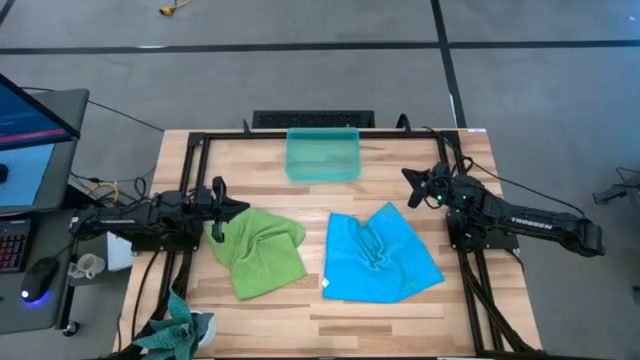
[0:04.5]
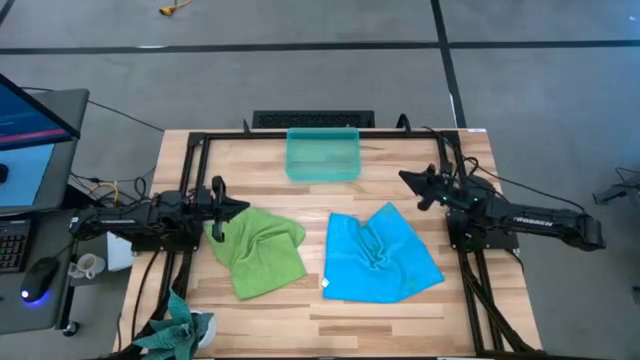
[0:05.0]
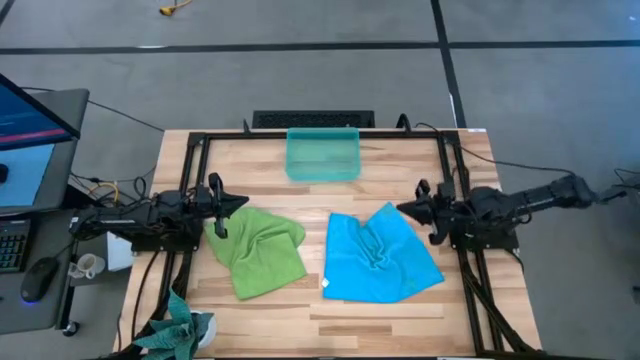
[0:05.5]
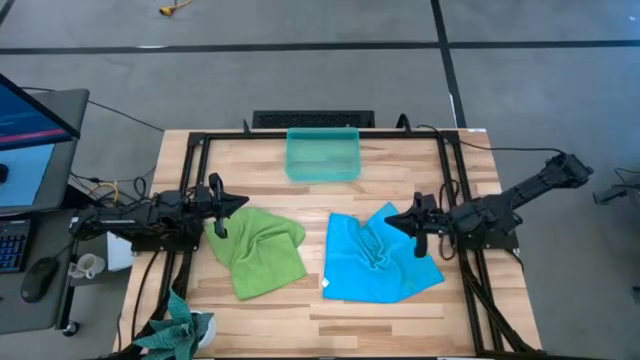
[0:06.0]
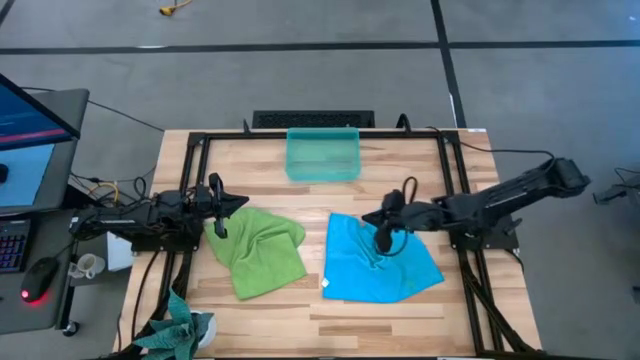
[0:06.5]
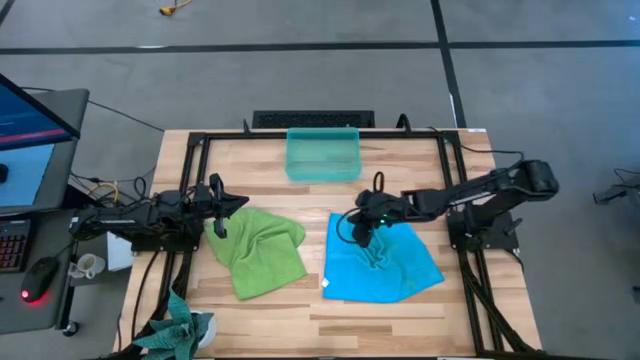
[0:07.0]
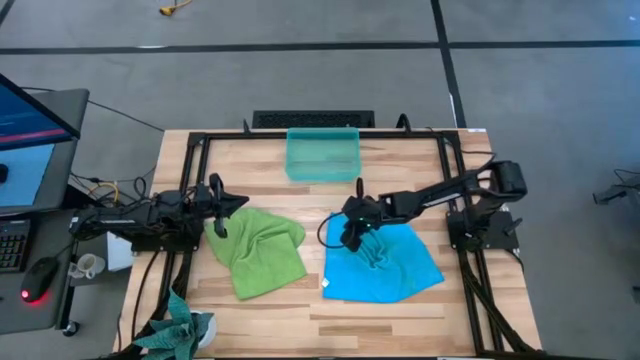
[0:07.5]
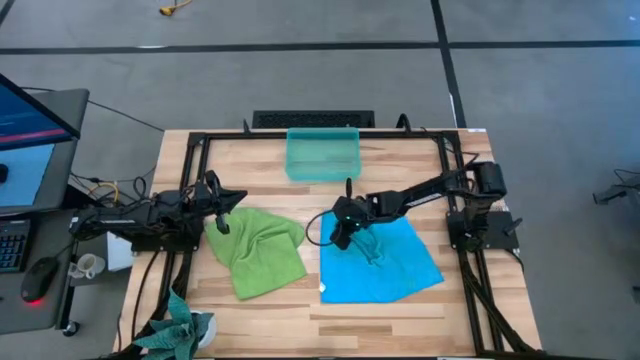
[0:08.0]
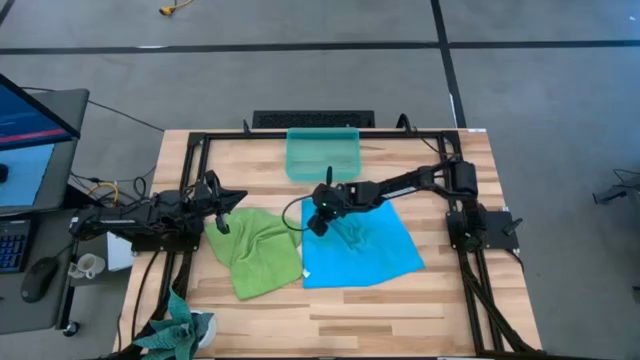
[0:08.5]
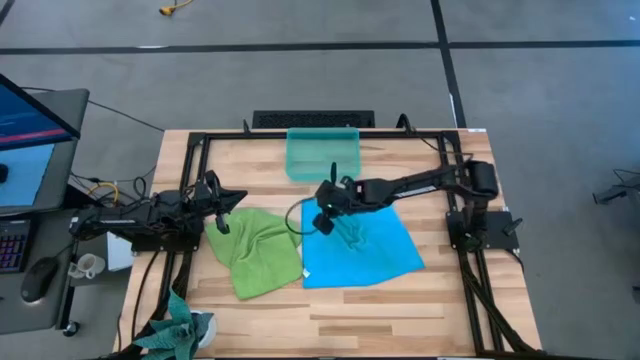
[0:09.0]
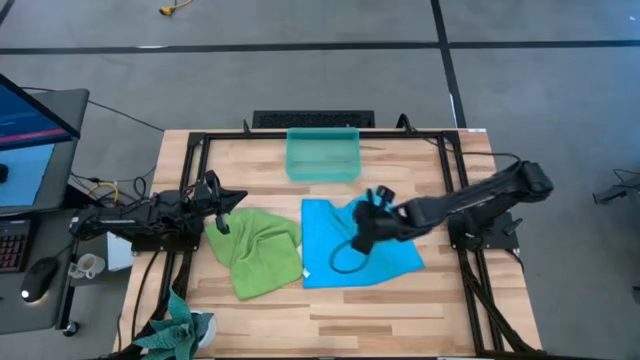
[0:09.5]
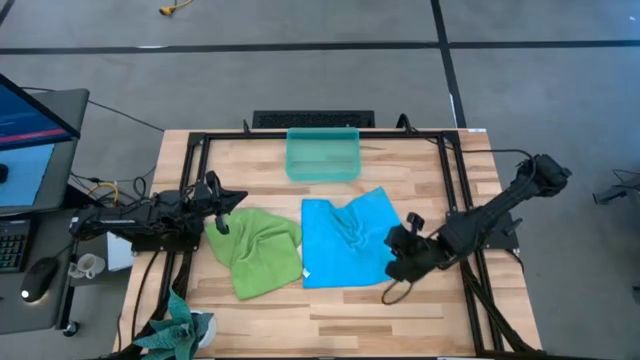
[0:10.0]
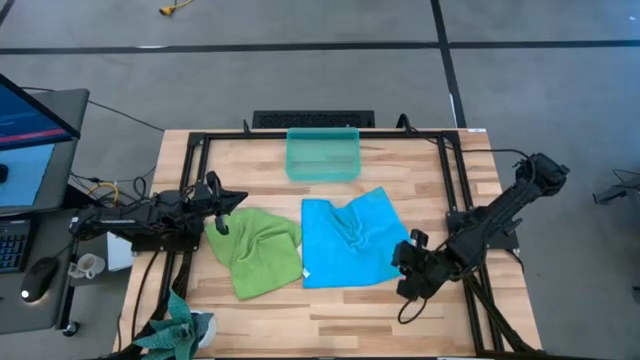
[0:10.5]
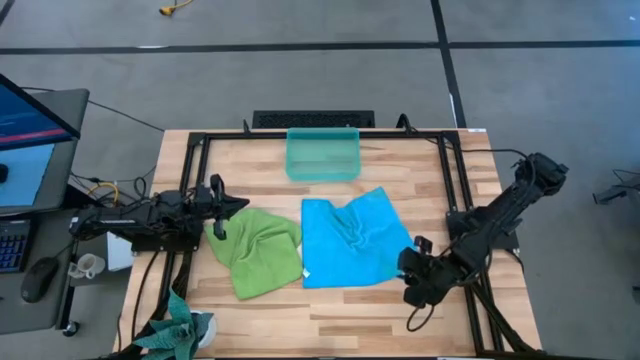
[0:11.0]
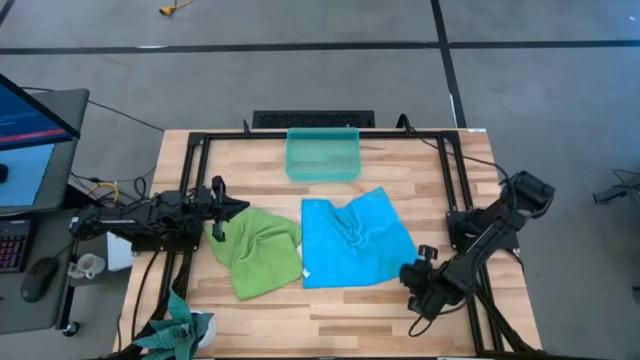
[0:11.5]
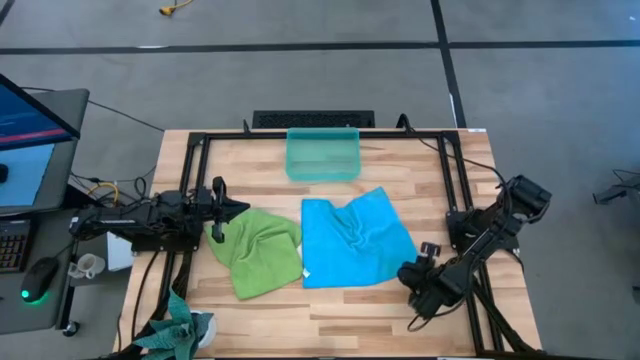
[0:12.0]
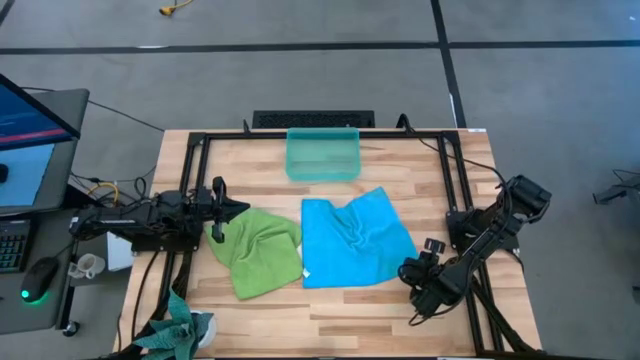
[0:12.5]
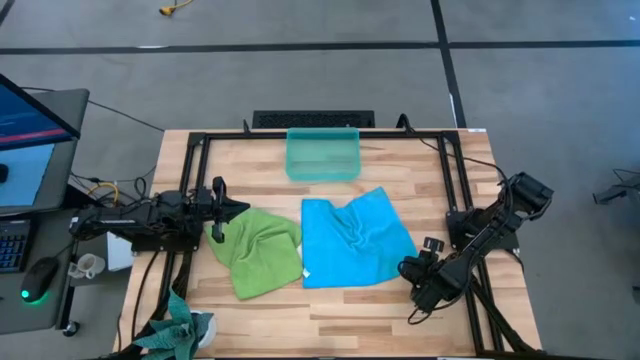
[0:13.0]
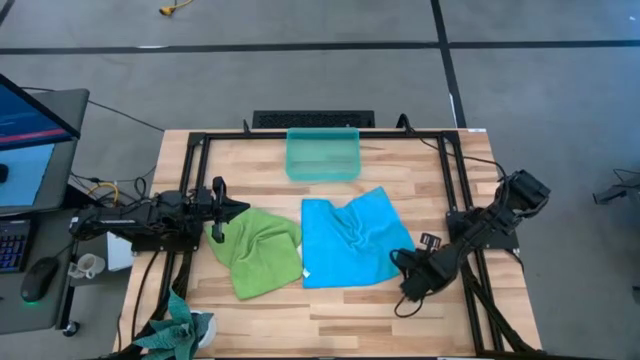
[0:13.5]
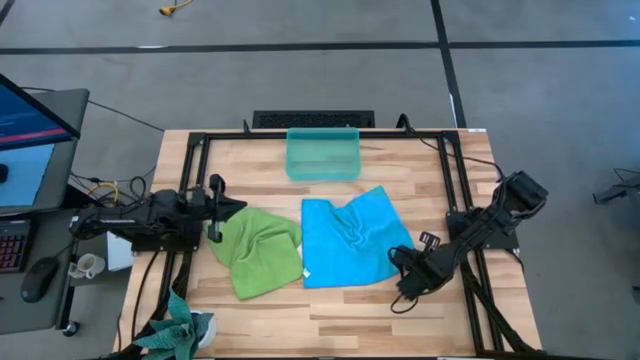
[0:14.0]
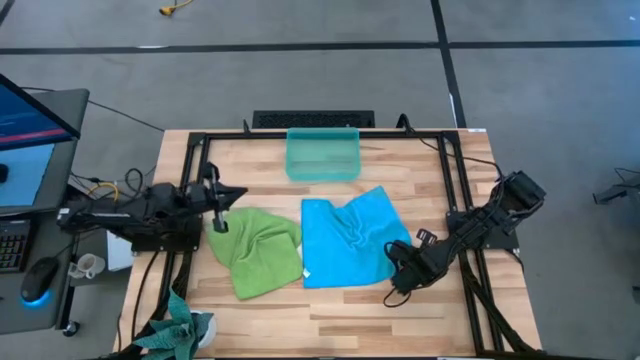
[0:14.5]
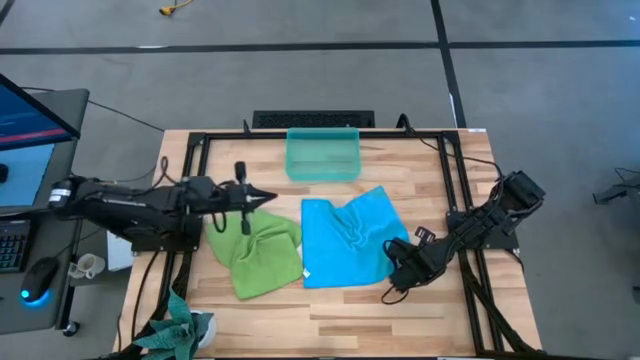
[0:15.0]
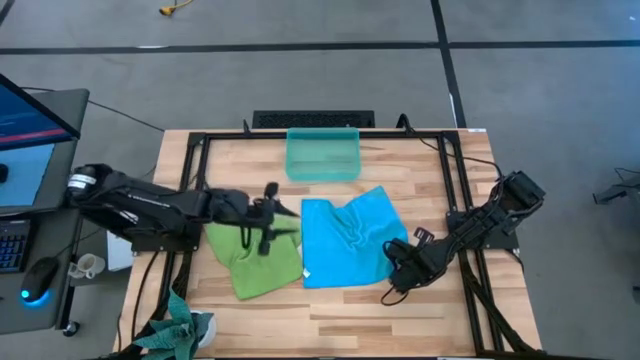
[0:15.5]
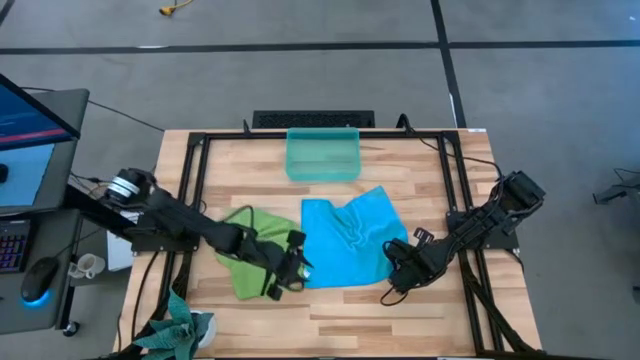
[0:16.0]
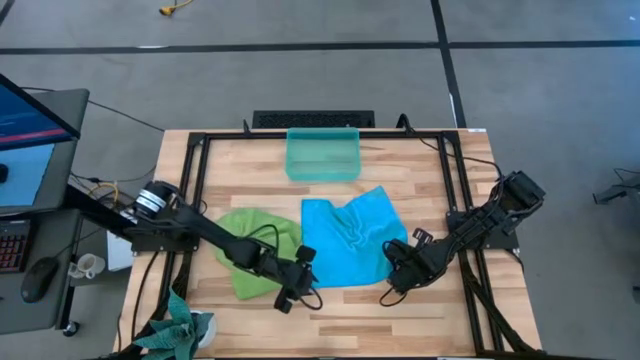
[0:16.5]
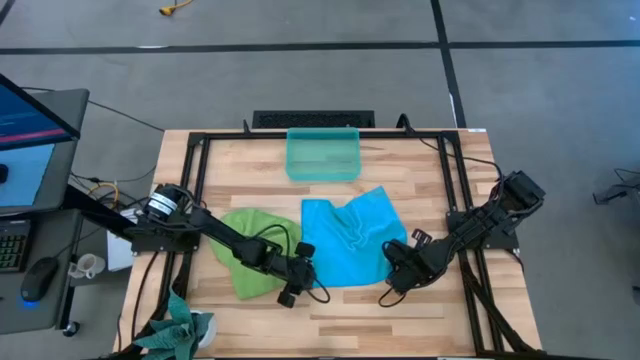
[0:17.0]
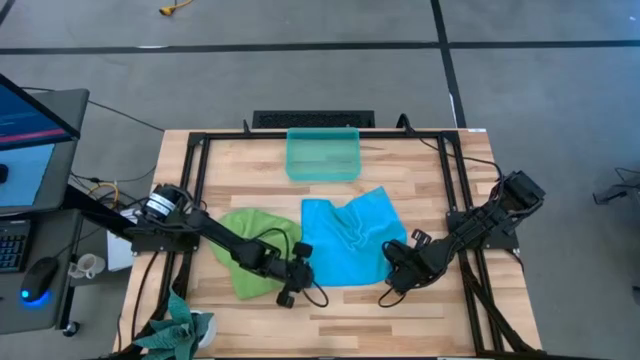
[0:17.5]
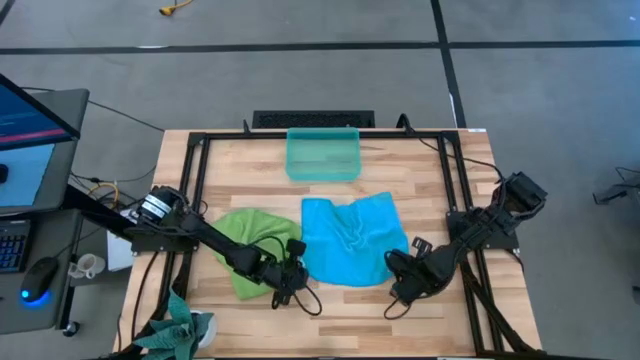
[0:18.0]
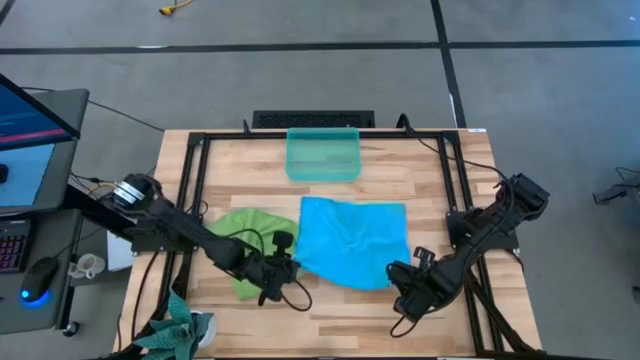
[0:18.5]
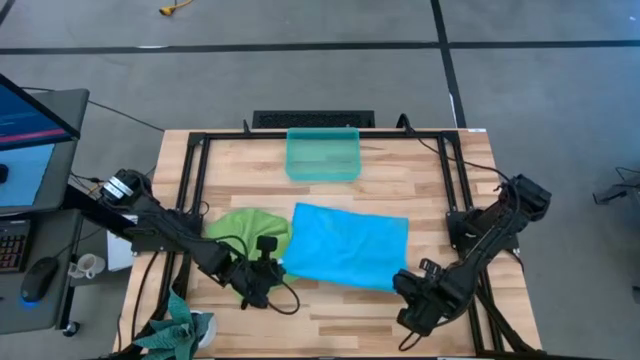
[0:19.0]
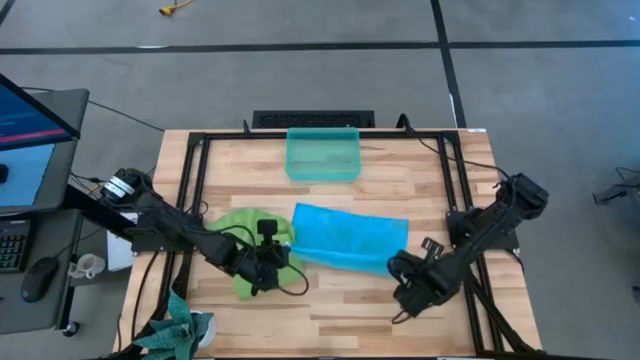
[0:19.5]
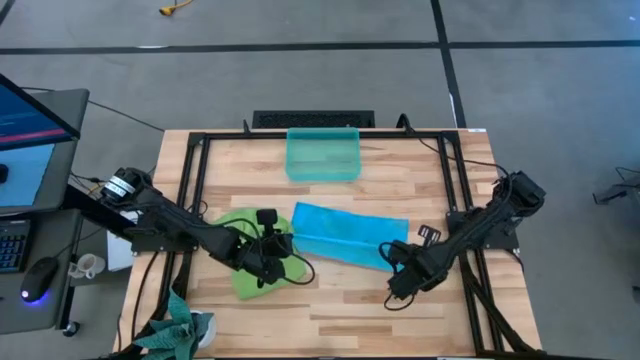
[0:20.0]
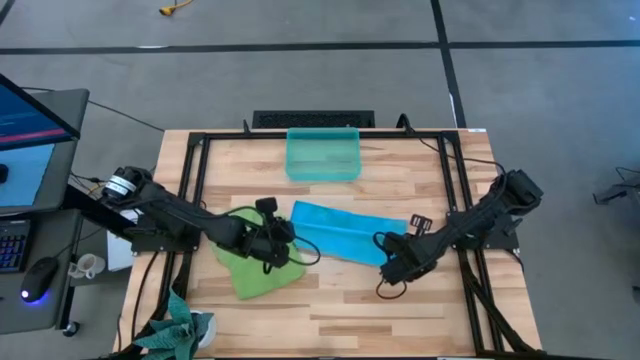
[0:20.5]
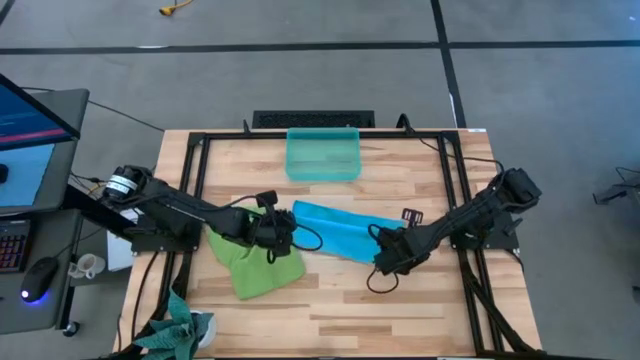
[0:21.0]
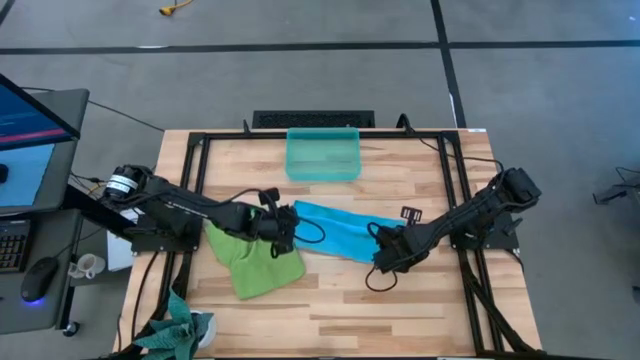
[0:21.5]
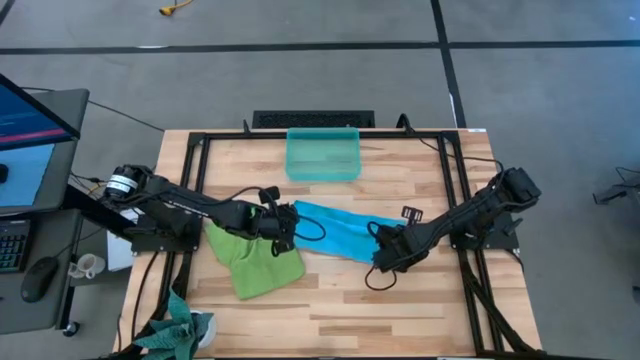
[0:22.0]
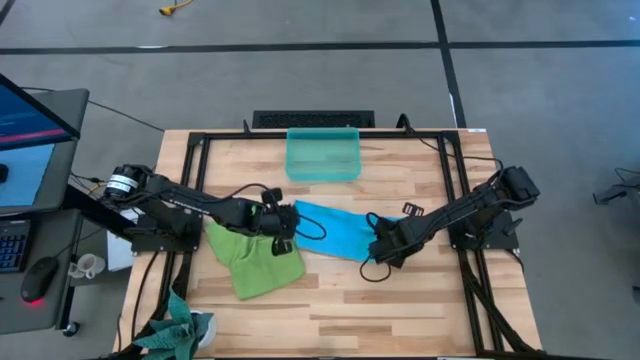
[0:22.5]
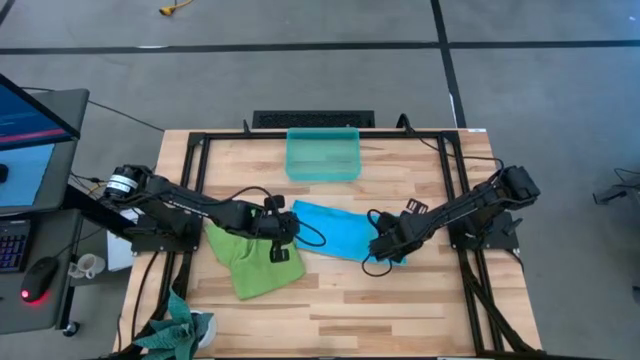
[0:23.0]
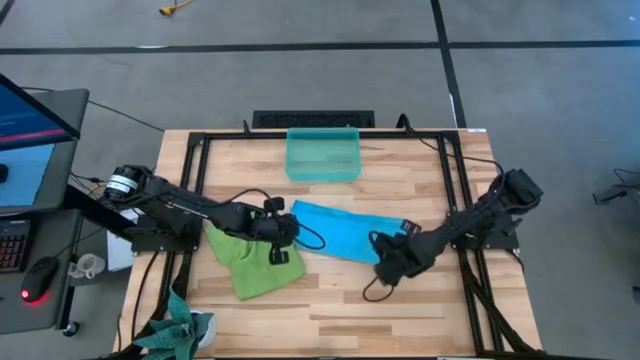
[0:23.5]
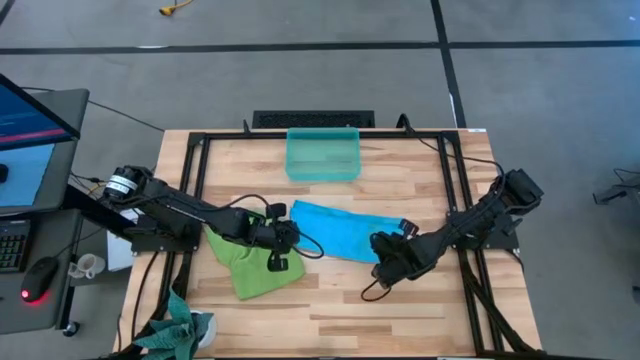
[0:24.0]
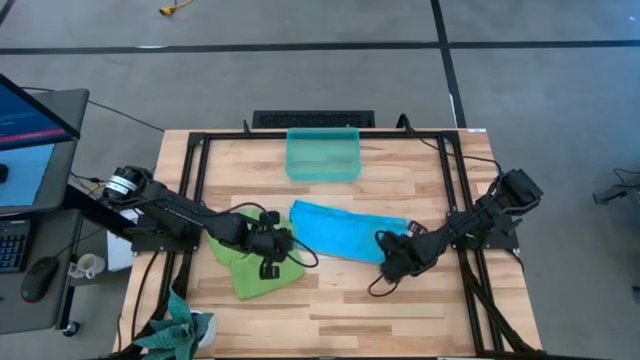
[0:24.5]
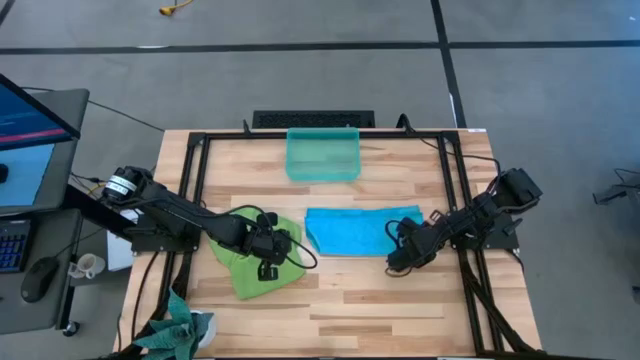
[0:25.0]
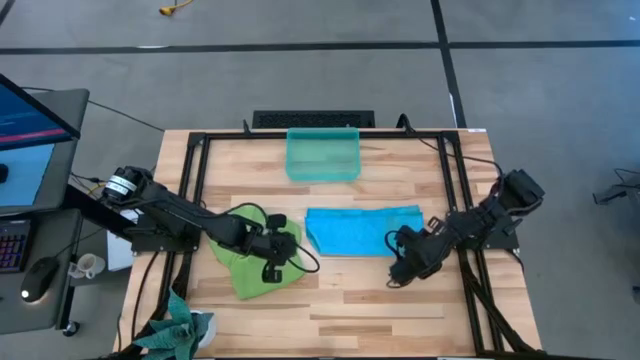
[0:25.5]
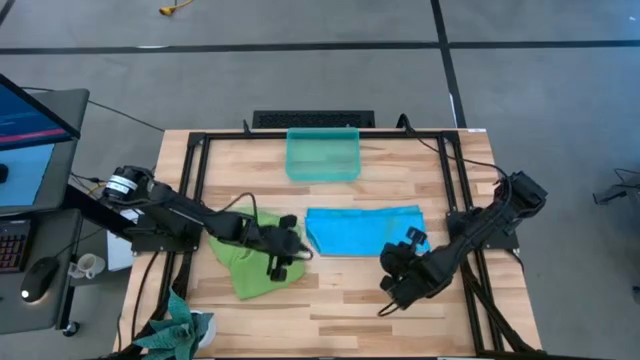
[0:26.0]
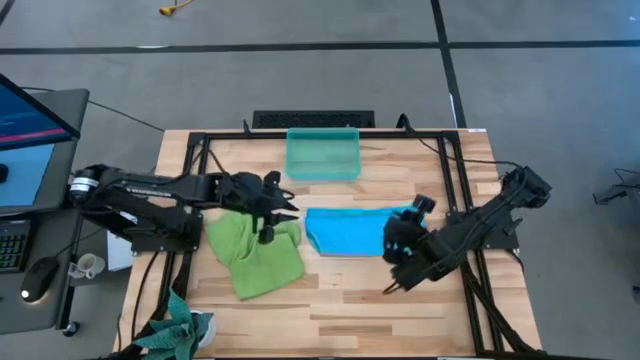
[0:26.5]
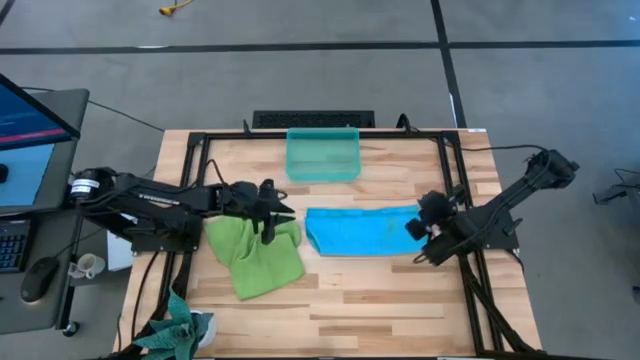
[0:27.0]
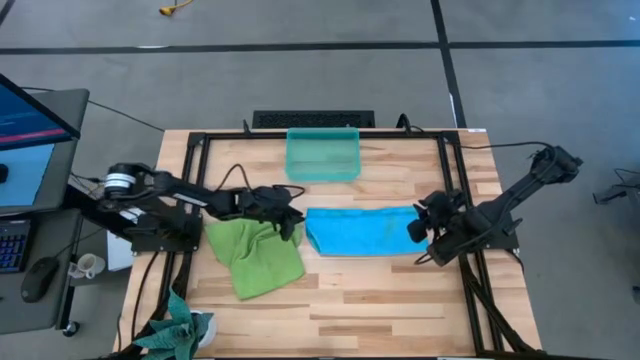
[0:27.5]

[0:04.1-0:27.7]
Task: Roll microfiber towels into tight, uniform cylinder then place into a basket
Fold the blue microfiber cloth
